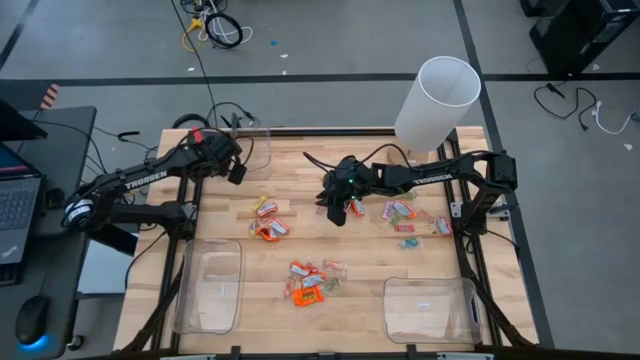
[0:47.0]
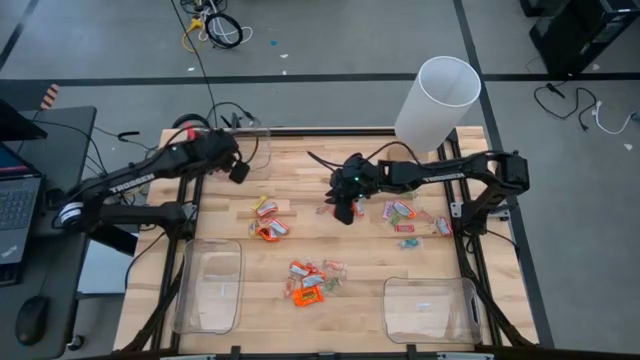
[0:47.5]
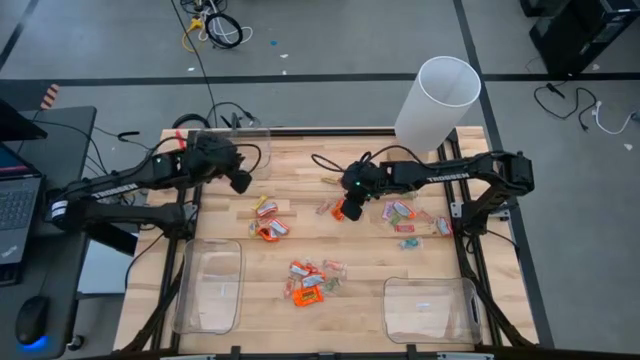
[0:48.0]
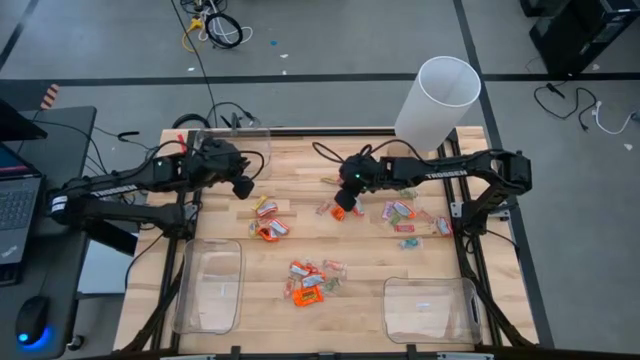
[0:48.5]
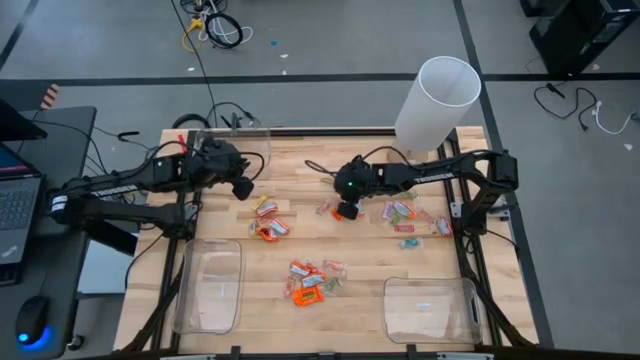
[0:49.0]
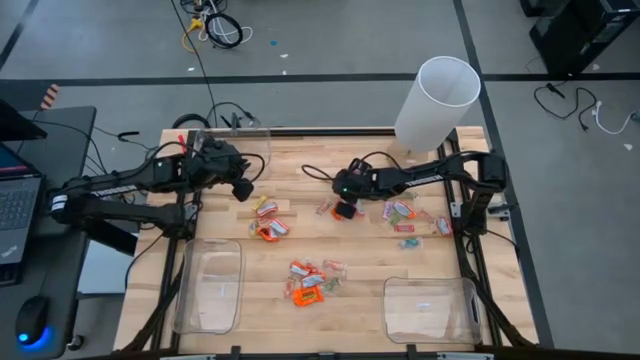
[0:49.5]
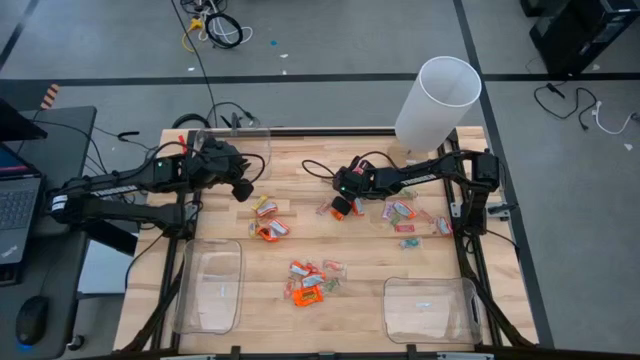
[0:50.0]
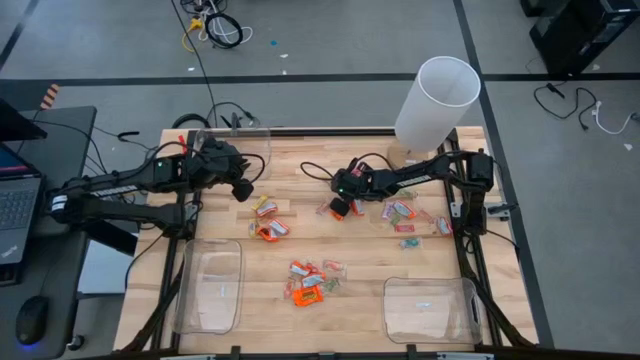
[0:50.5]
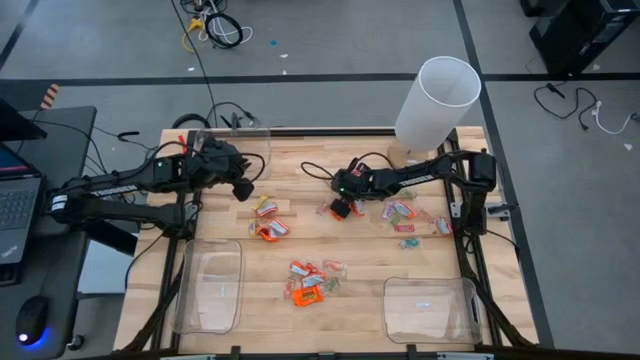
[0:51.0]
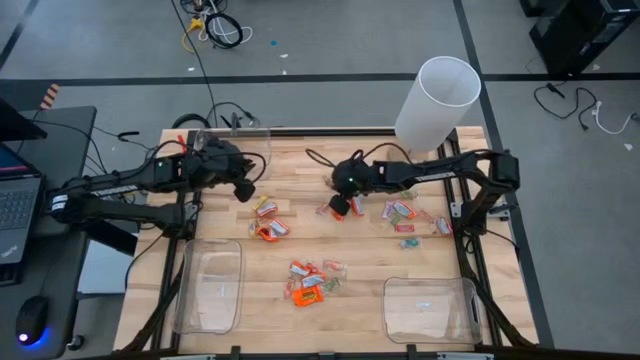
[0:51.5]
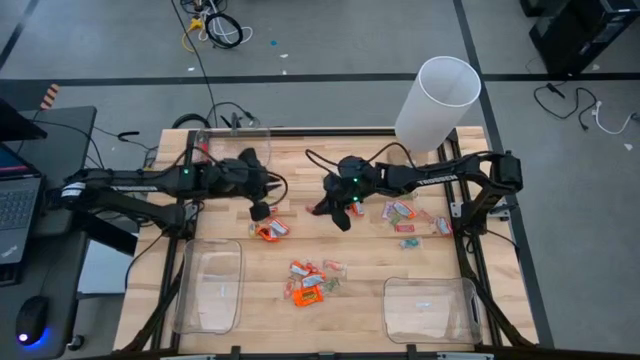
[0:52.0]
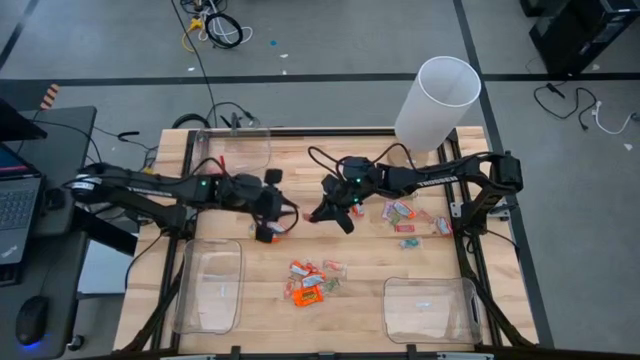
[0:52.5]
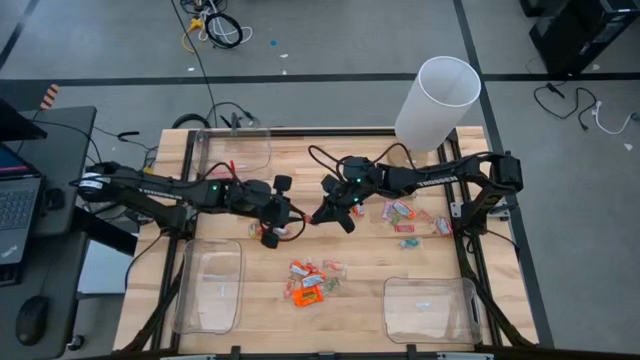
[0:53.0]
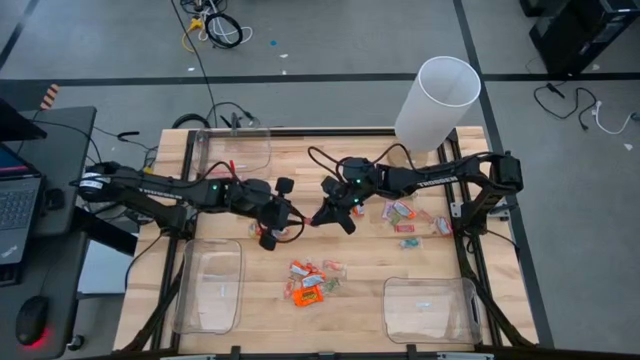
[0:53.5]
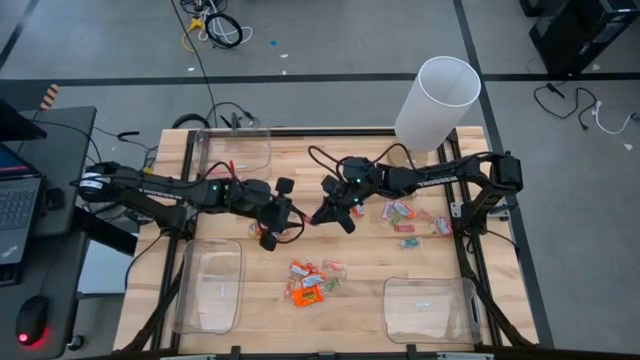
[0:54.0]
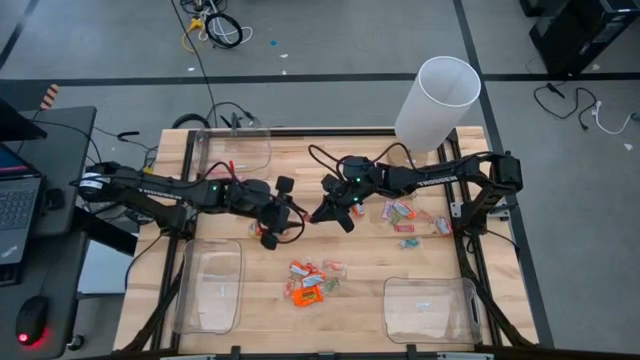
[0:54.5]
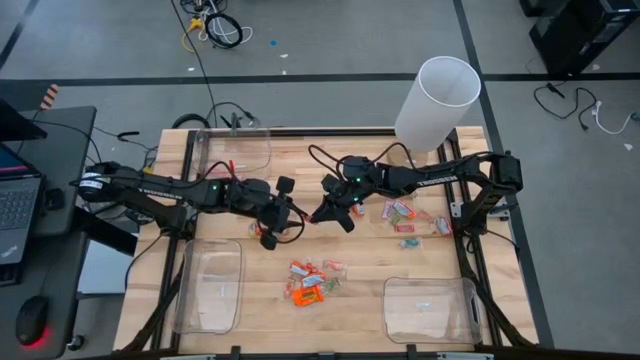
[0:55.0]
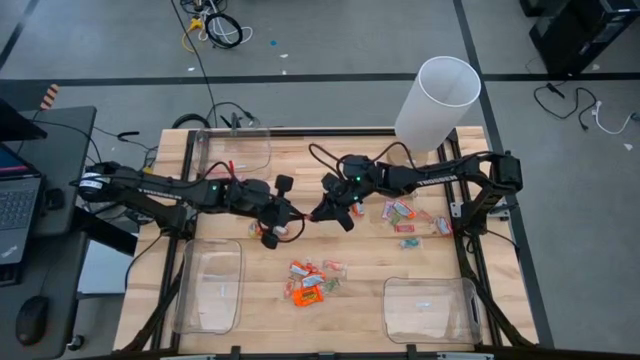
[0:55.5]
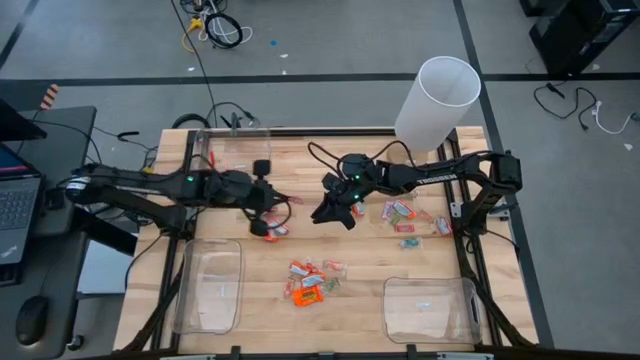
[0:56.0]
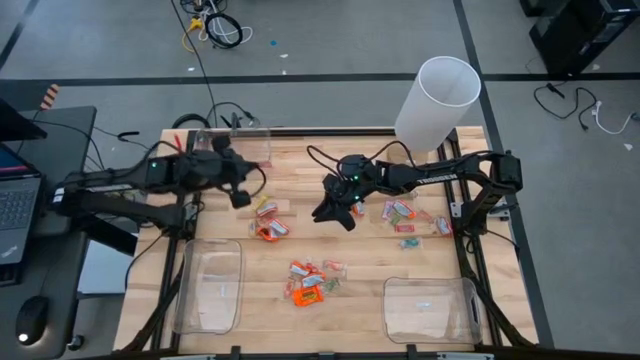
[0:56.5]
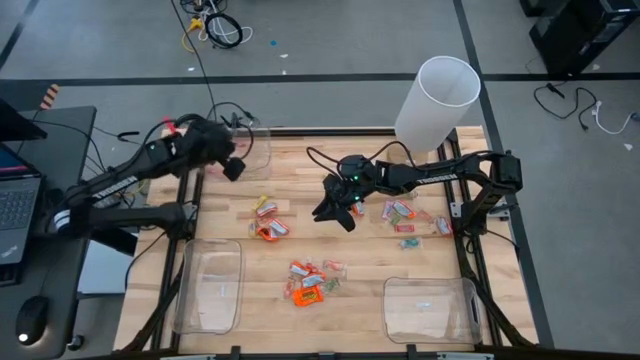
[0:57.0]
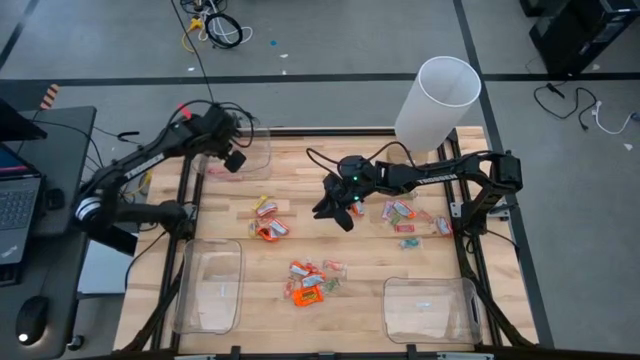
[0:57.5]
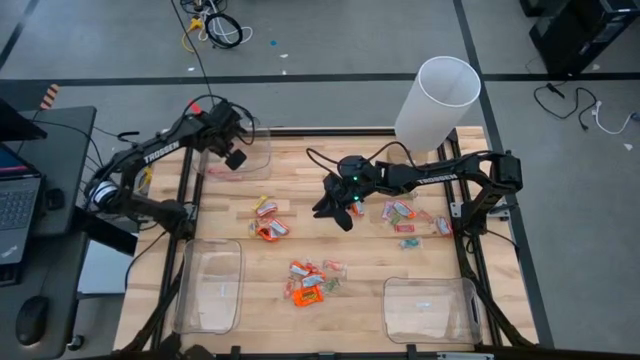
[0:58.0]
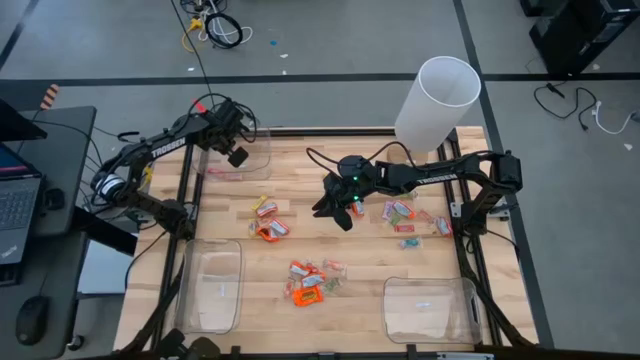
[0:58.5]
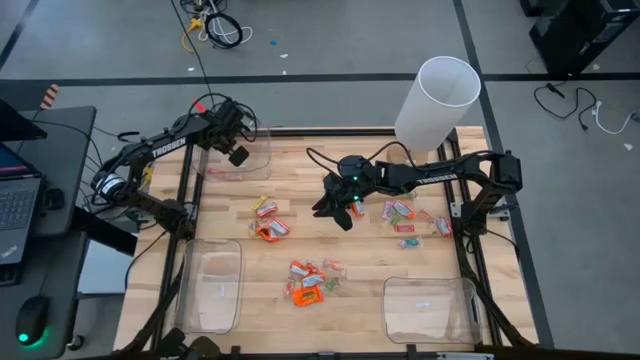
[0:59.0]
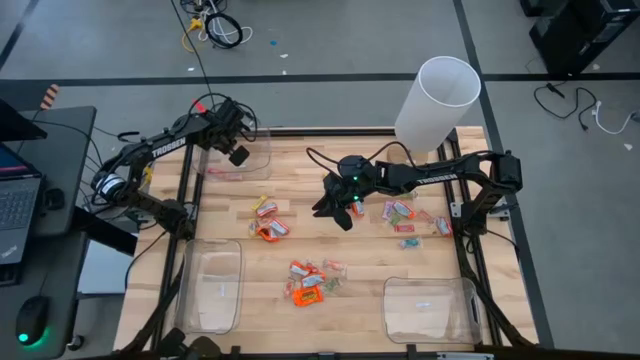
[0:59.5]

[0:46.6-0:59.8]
Task: Sort candy
Put the red candy into the top left transparent bin

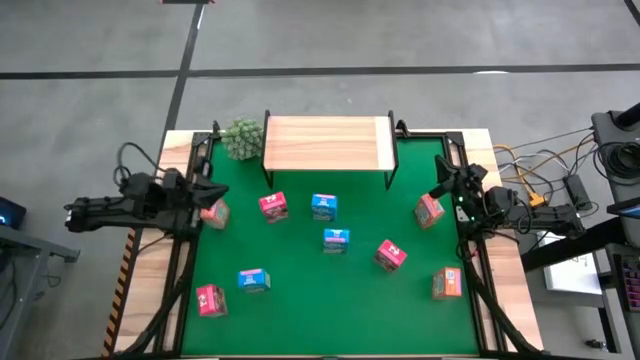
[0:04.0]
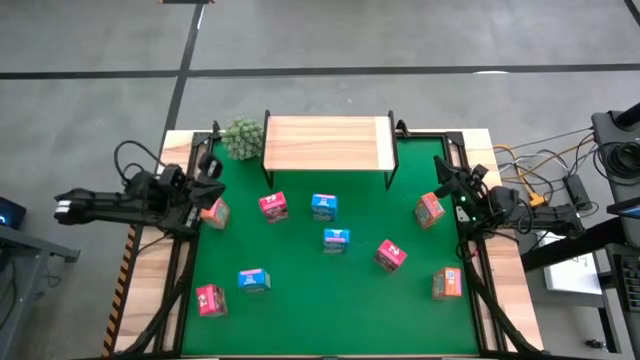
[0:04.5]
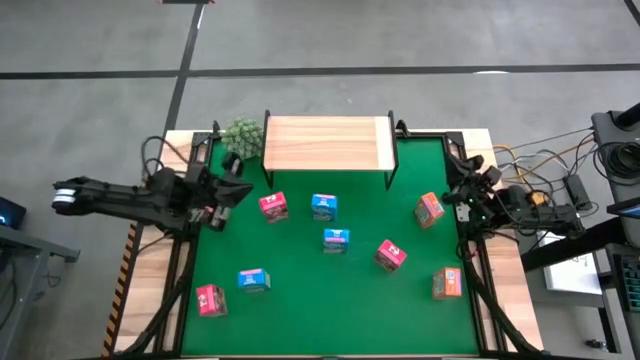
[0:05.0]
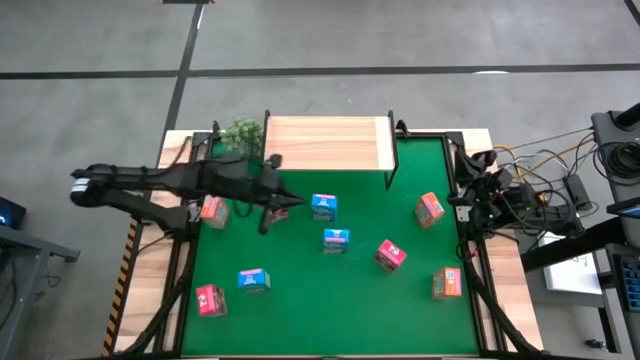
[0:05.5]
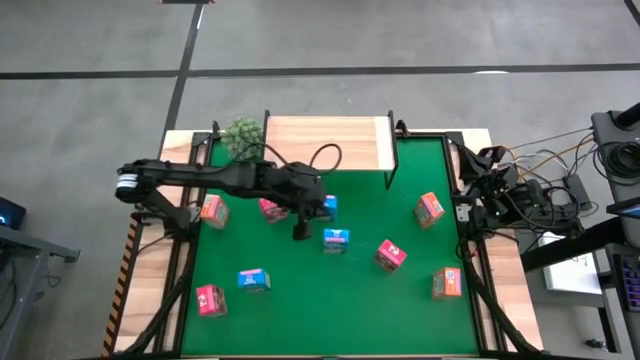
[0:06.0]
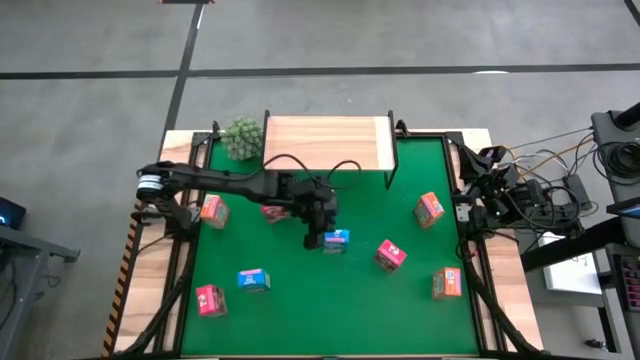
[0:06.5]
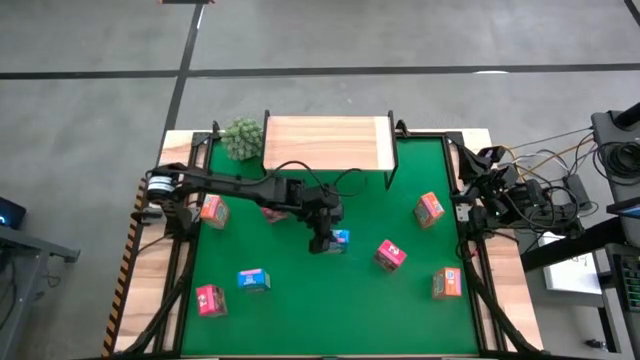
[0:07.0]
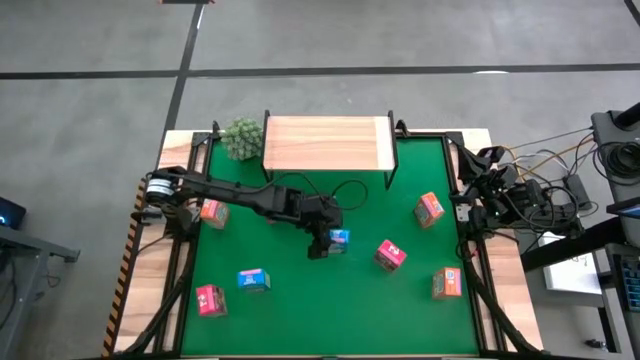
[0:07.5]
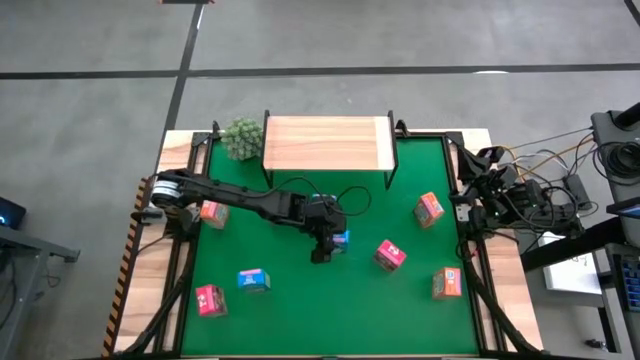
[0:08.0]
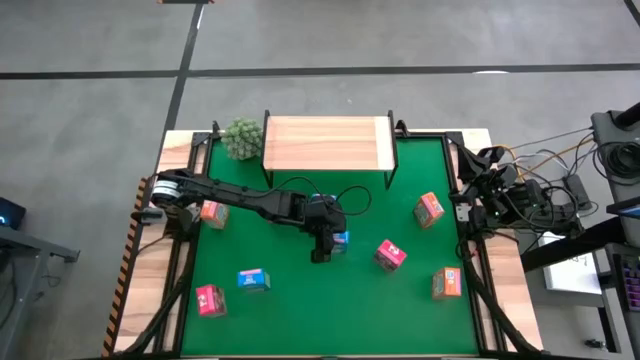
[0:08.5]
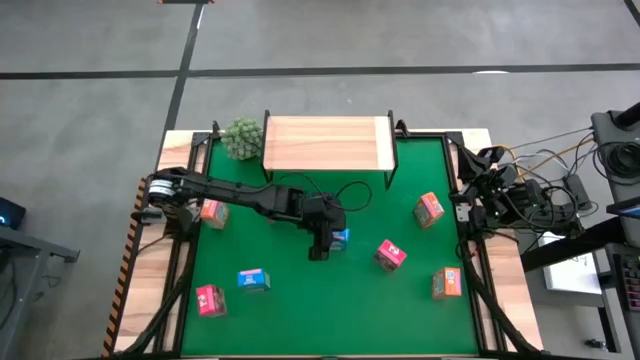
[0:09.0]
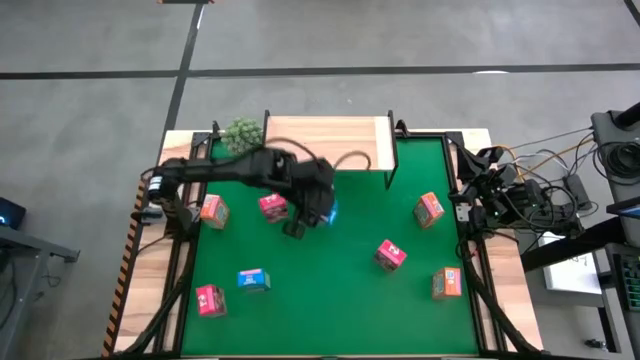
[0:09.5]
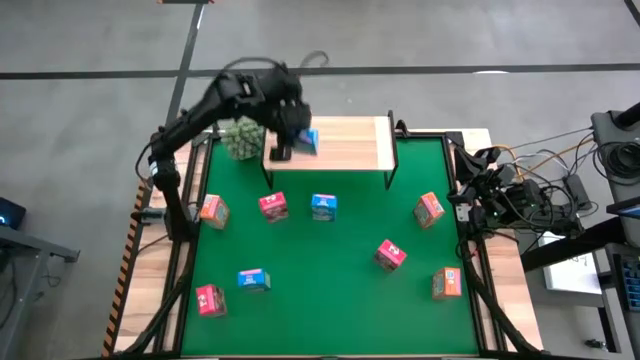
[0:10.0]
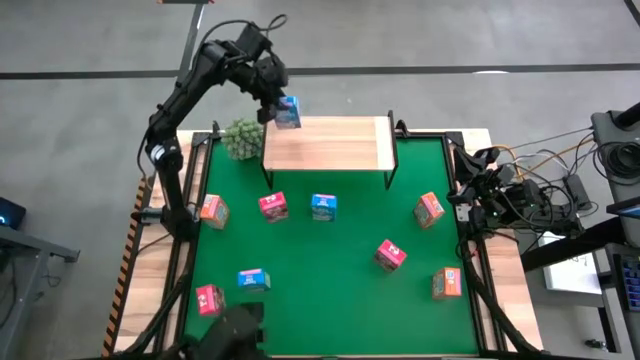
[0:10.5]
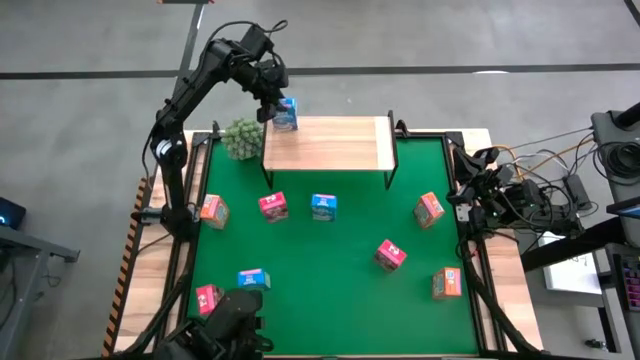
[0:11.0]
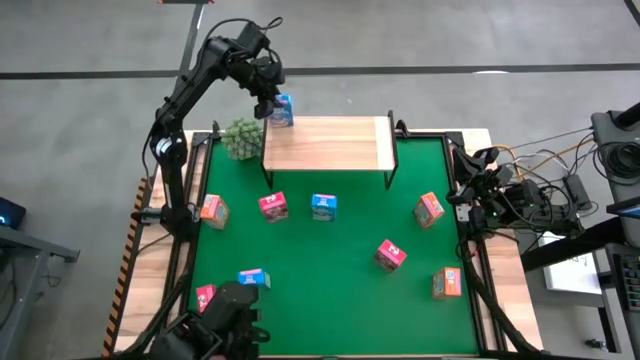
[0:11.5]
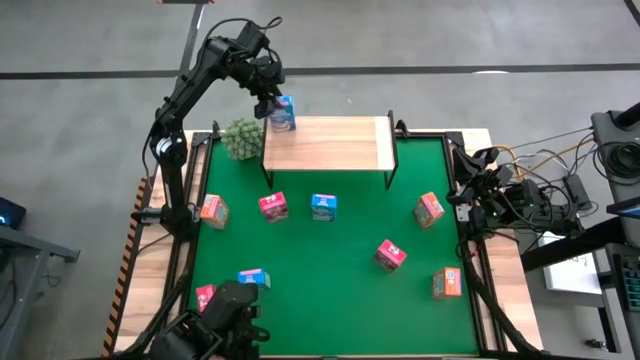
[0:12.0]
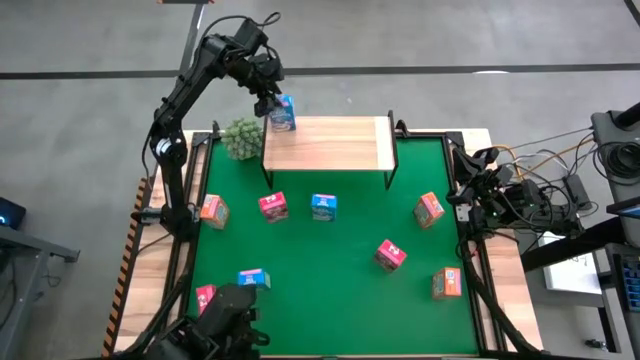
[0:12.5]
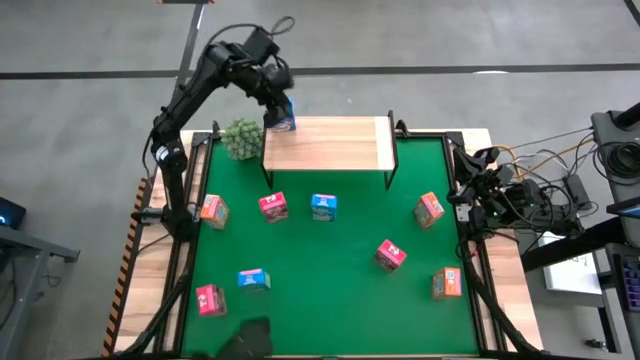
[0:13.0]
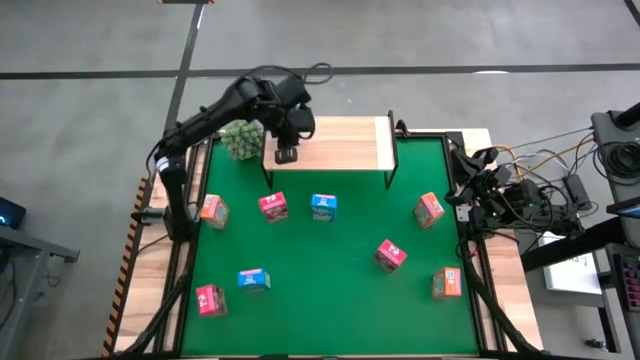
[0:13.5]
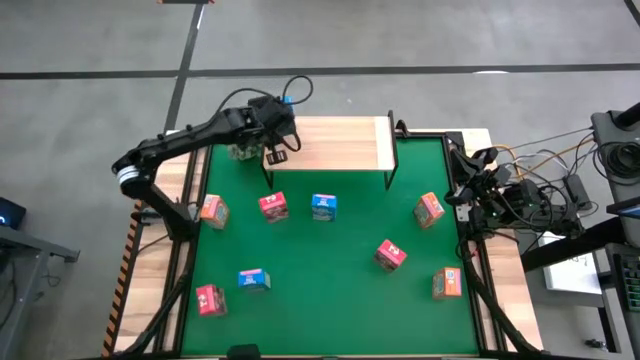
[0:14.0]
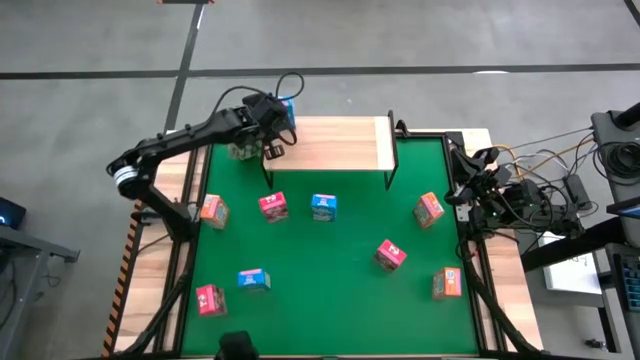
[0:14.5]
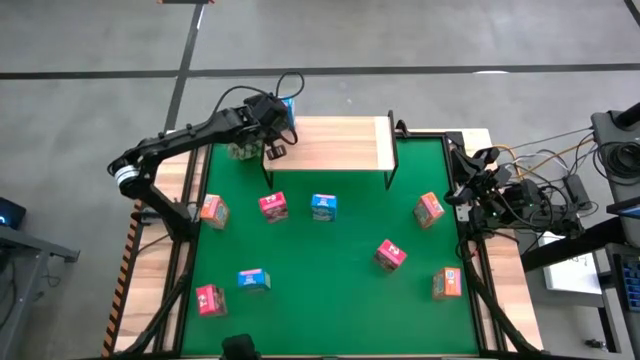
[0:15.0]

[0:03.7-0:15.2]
Task: Stack cereal on shelf
Put the middle right blue cereal box on the shelf
